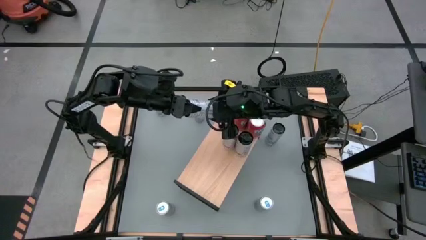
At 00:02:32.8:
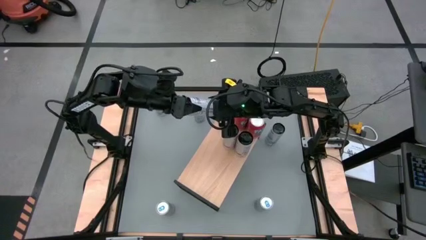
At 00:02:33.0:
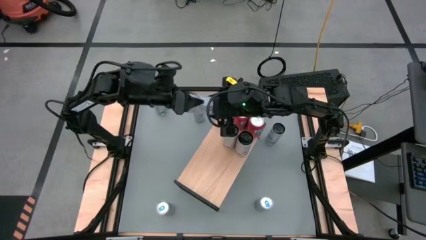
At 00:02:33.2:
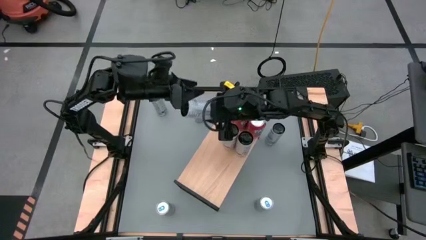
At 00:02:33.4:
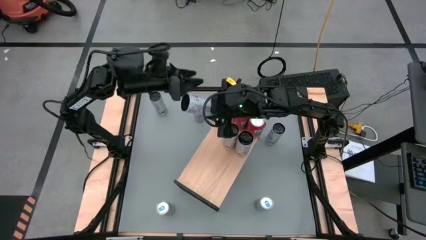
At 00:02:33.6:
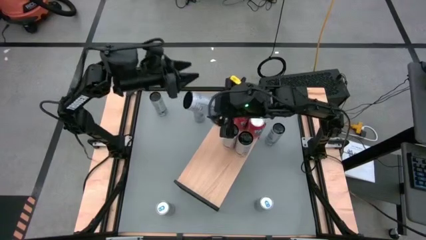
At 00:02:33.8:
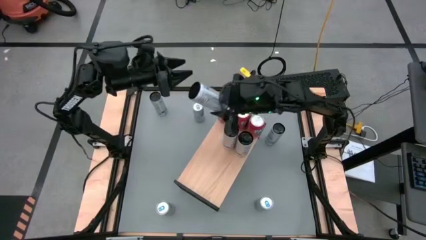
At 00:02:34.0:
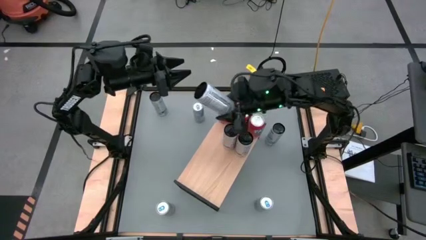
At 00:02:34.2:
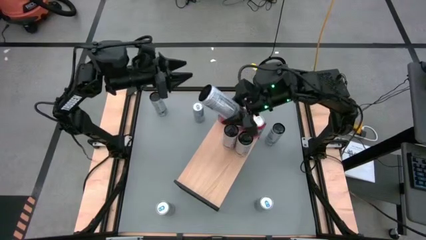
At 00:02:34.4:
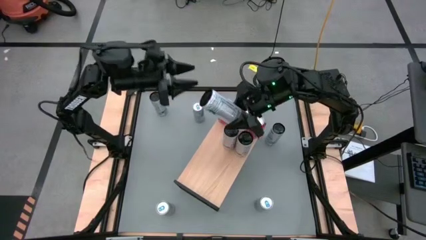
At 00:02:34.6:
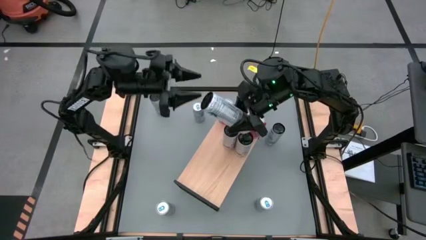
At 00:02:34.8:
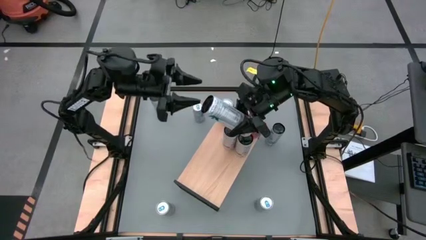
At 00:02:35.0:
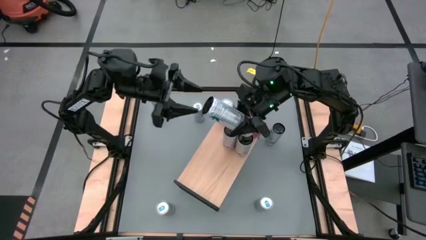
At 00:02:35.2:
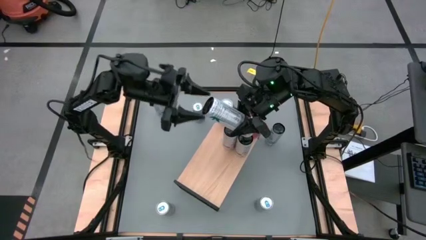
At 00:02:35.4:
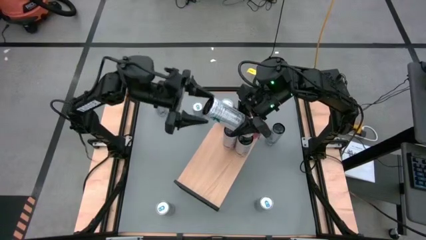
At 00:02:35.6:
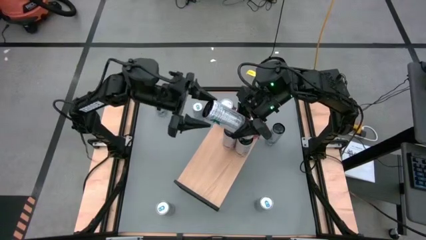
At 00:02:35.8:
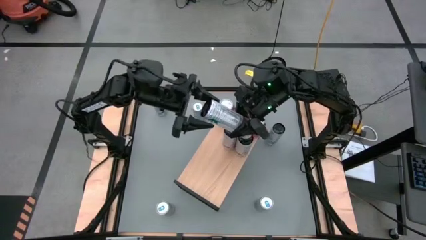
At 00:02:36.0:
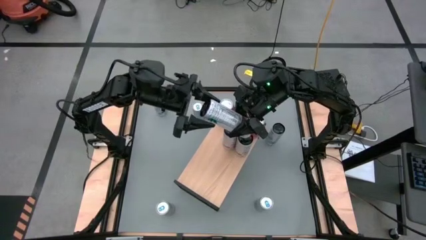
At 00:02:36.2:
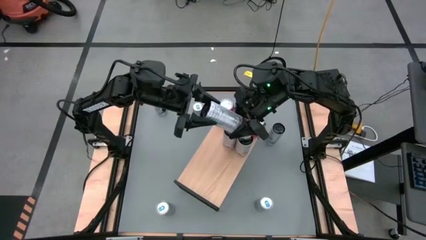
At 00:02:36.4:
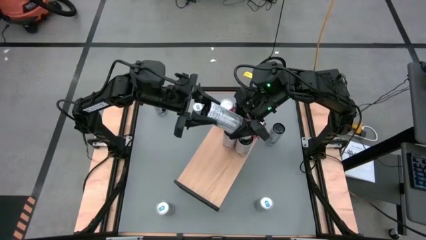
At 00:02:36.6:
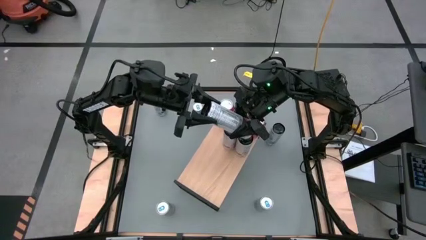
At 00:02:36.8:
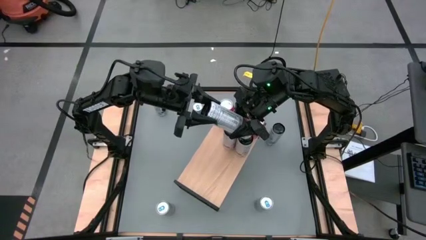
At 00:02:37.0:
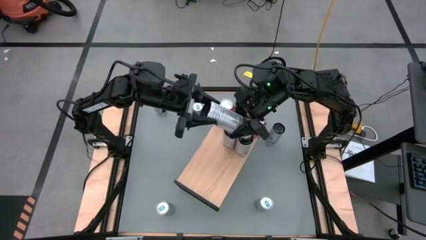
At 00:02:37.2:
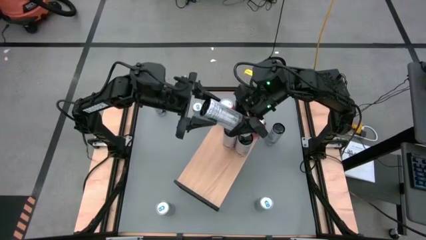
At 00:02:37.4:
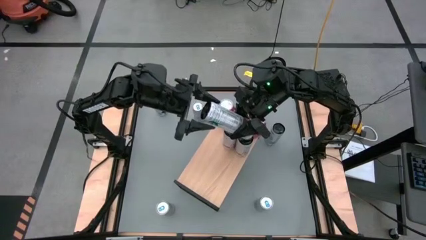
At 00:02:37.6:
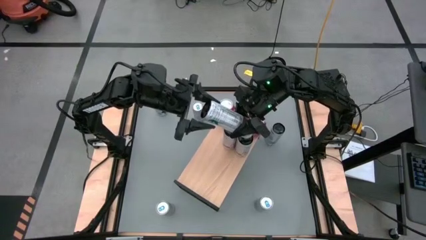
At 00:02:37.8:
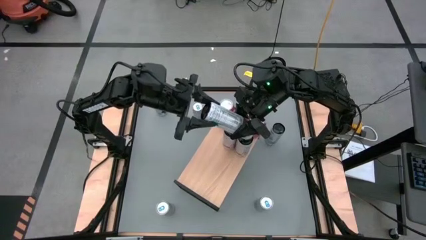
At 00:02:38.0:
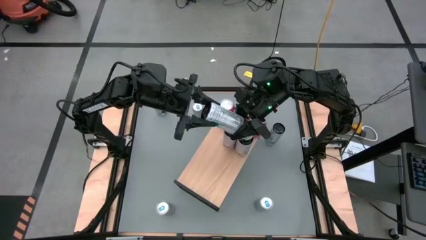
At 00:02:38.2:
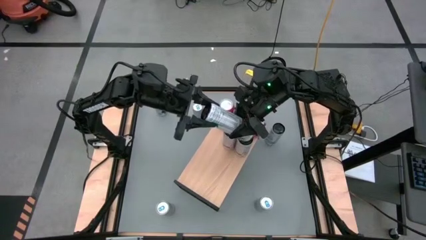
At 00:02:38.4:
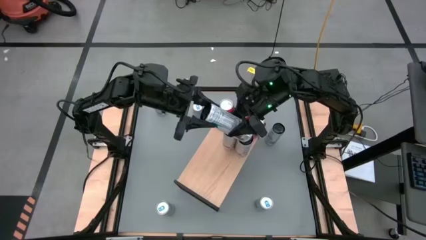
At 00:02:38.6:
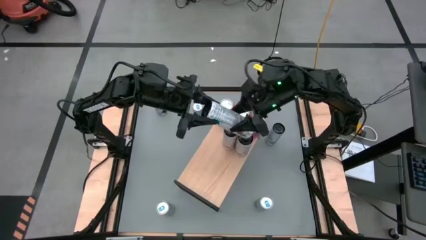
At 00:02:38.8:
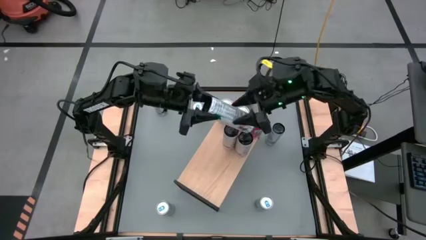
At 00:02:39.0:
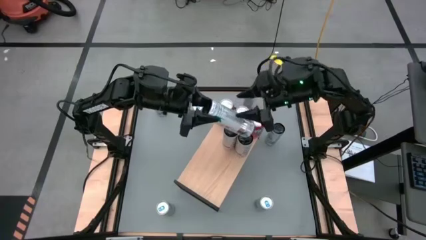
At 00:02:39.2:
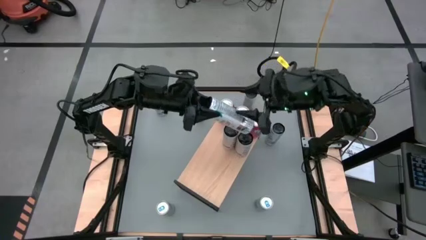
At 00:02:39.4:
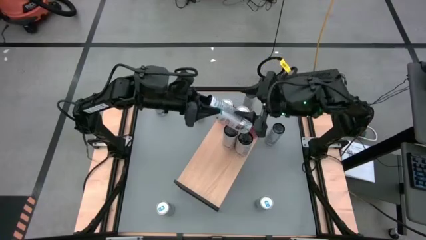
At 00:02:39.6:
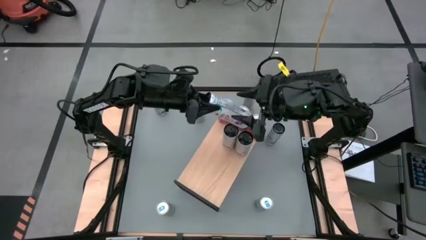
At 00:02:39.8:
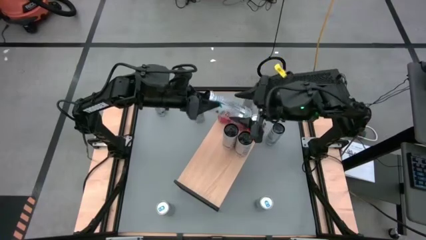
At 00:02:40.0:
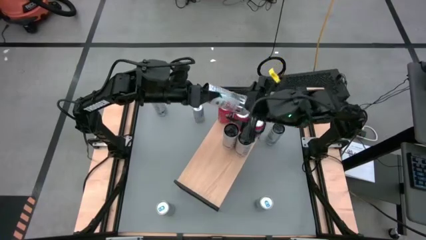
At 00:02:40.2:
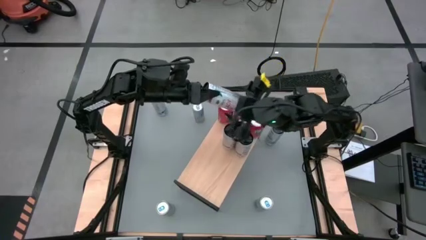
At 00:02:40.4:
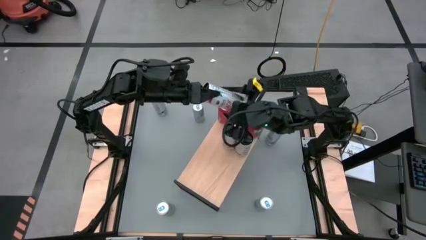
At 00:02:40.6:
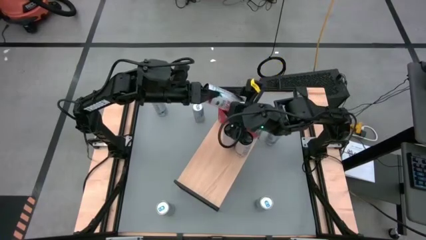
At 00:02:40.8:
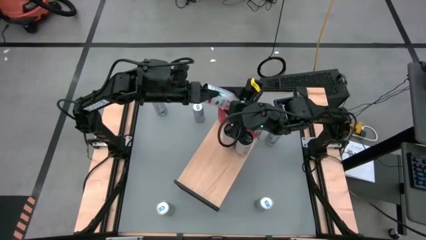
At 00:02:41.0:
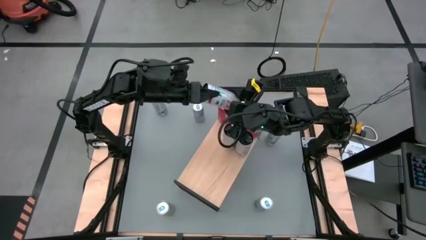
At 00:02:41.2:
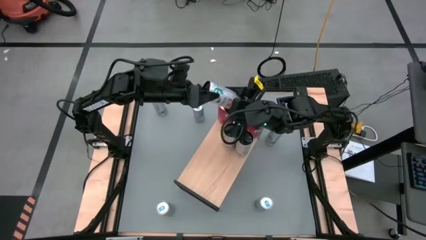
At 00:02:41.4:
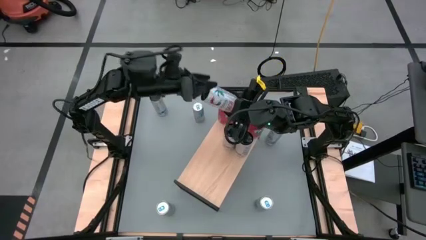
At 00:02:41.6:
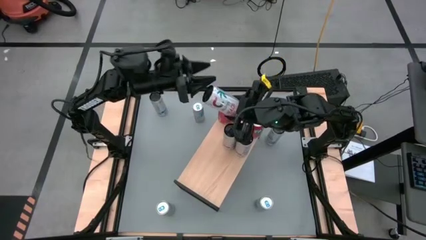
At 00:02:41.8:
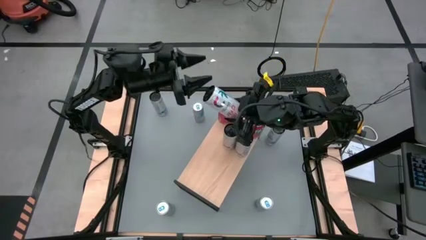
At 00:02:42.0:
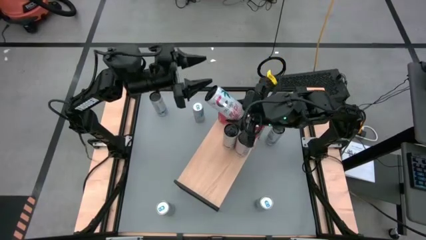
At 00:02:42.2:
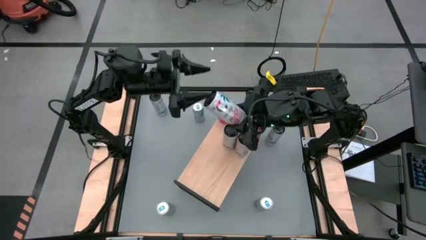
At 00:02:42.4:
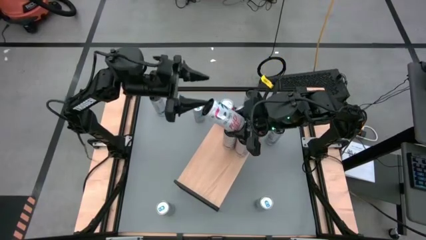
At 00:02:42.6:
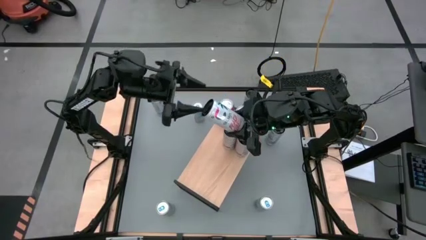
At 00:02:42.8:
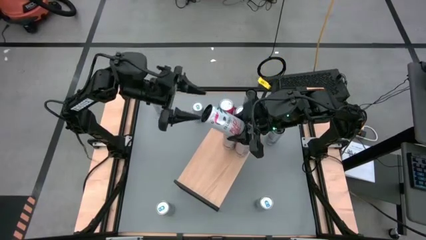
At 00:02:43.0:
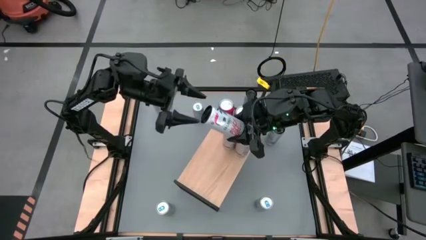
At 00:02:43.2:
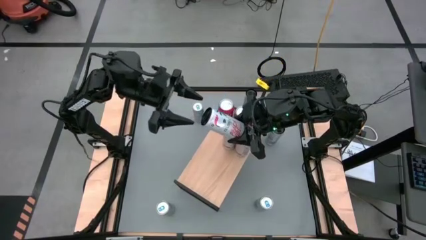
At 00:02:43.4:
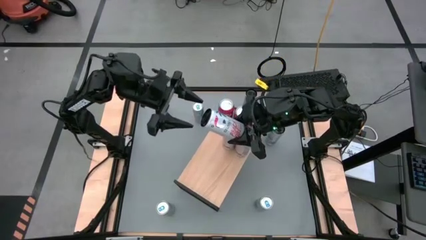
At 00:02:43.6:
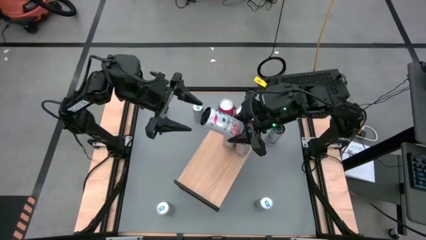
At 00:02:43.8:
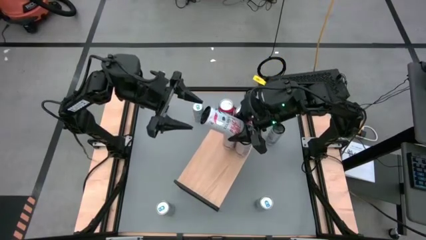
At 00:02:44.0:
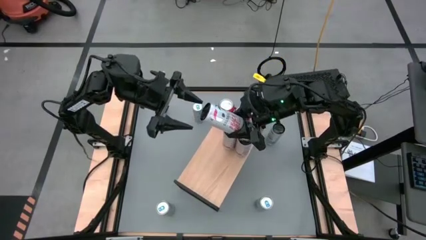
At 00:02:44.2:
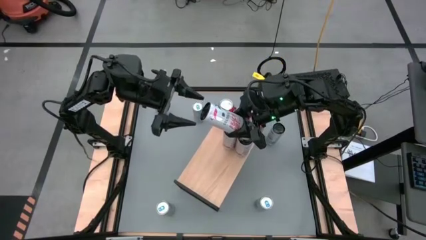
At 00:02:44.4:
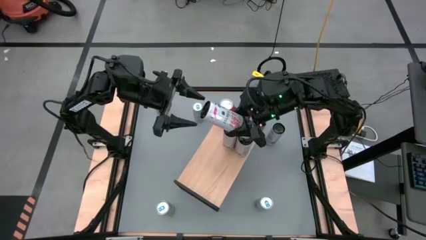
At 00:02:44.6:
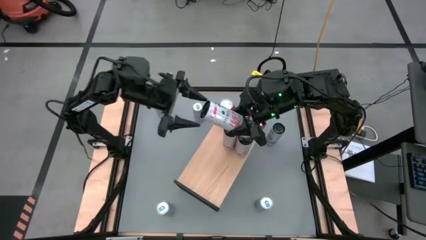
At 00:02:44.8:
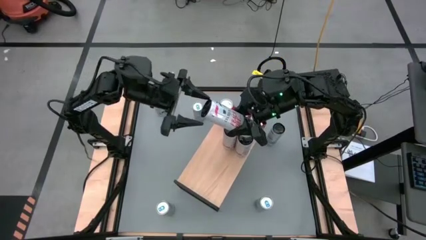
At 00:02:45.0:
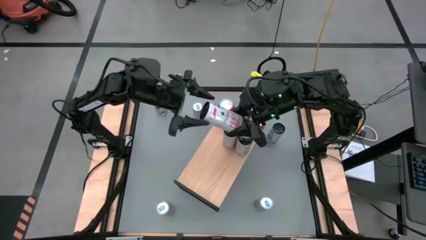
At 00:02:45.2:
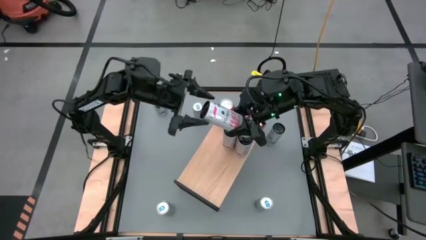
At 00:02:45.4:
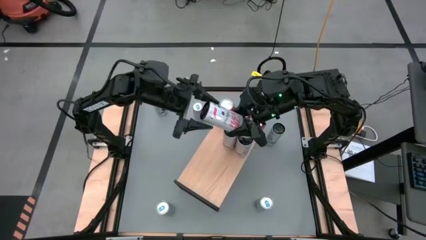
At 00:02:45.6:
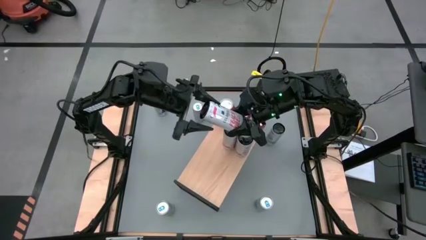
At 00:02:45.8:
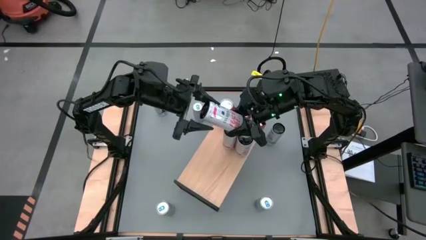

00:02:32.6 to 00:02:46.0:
Task: Place canned beverage on shelf
Put the white pink soda can on the shelf aligned with the other white pink soda cans

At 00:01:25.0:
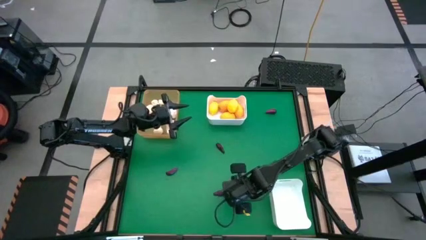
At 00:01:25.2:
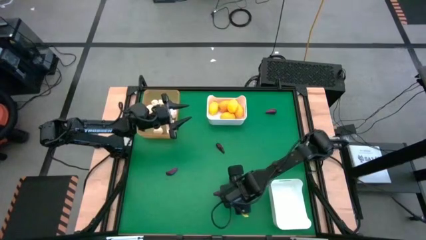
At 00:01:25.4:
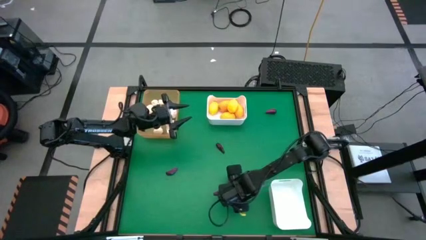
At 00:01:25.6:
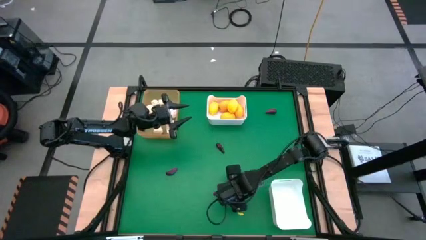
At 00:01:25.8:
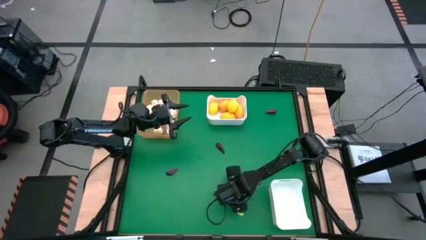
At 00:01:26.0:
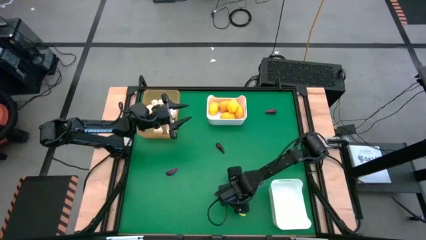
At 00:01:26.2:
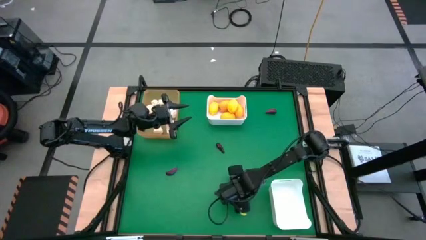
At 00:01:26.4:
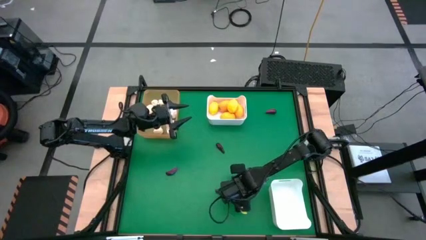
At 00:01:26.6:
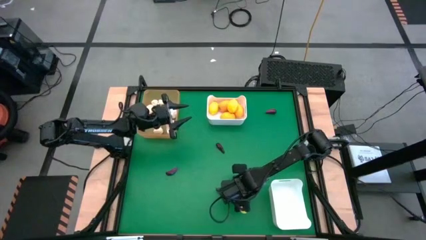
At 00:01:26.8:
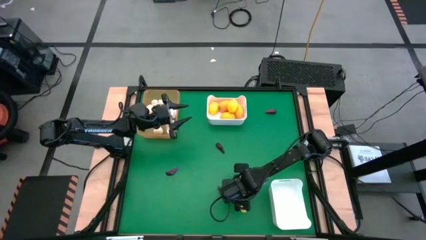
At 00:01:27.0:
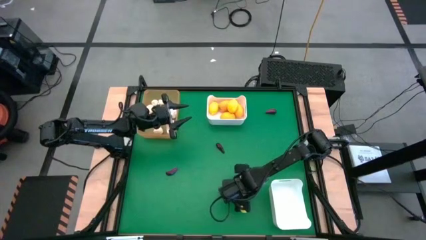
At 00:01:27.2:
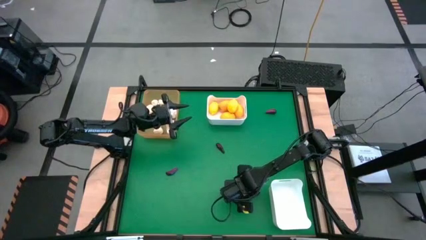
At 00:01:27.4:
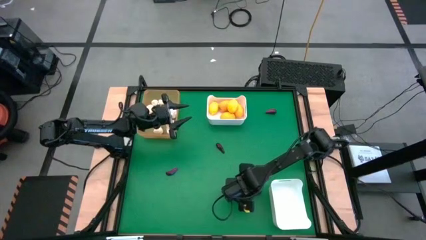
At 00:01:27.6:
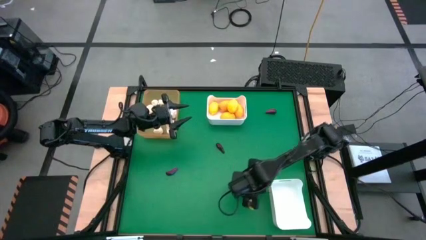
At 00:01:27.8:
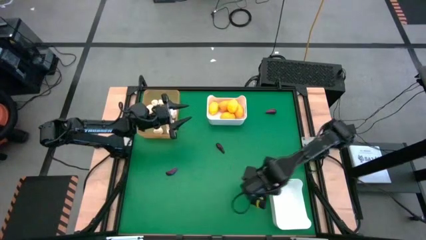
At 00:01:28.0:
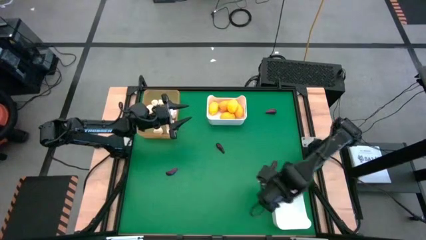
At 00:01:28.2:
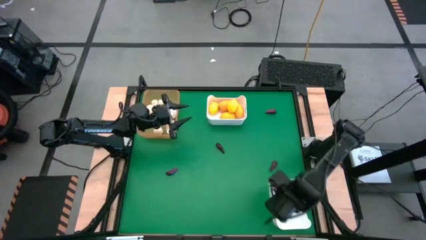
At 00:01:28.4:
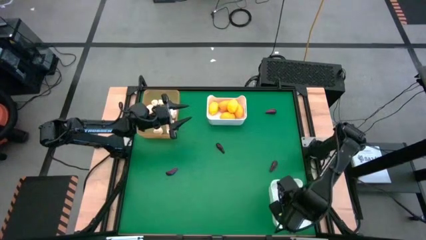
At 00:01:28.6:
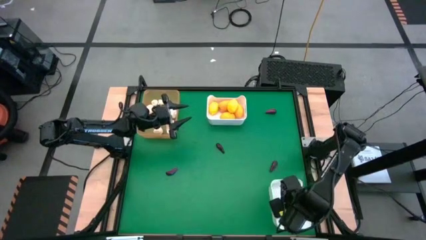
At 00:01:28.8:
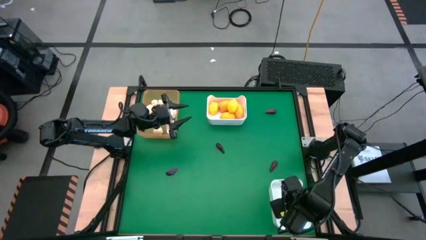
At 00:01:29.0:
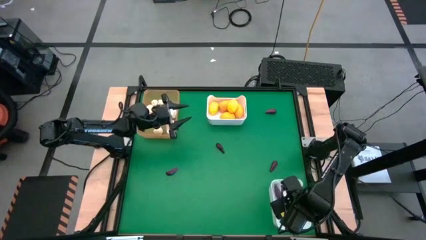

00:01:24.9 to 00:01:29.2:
Task: Sort produce into baskets
Put the eggplant into the bottom white bin
